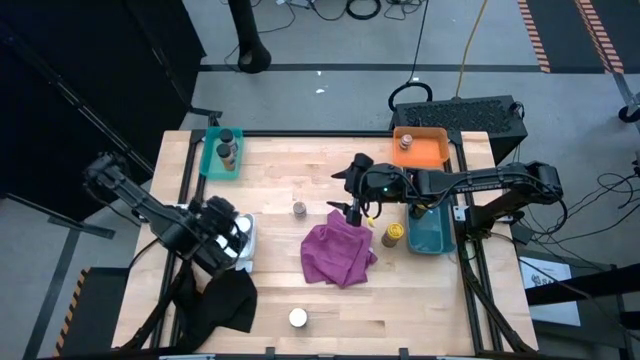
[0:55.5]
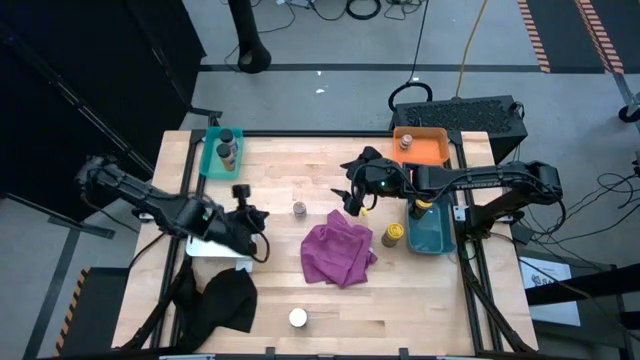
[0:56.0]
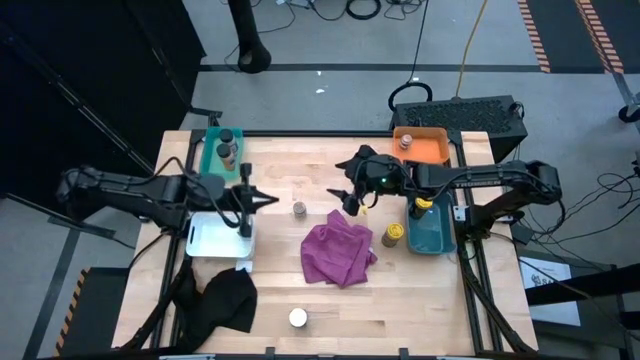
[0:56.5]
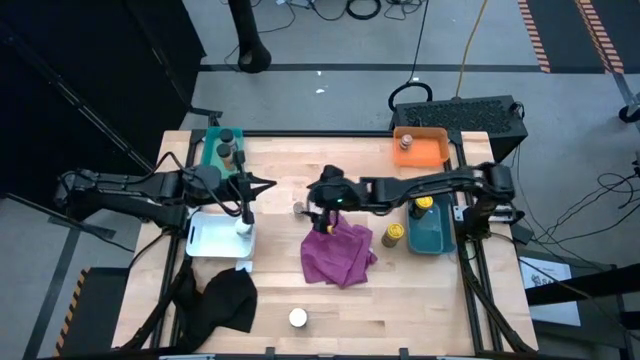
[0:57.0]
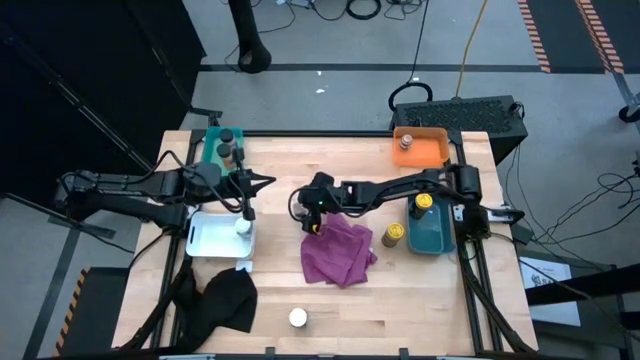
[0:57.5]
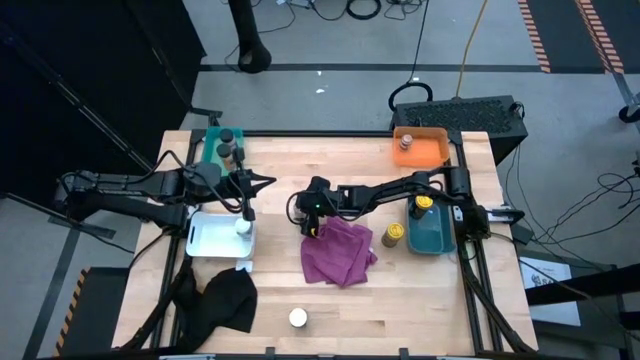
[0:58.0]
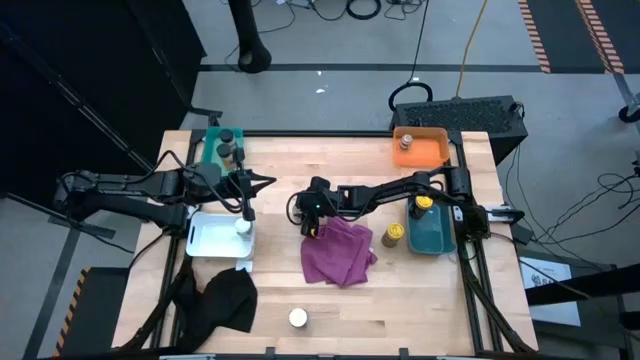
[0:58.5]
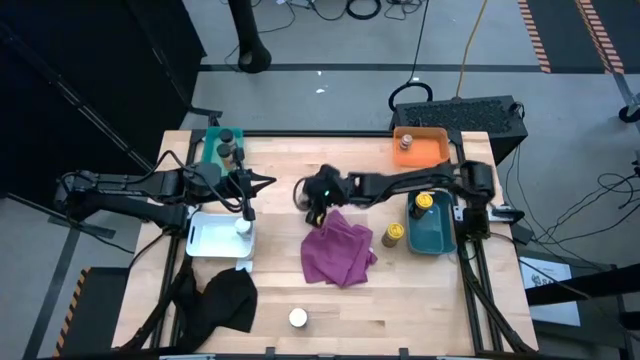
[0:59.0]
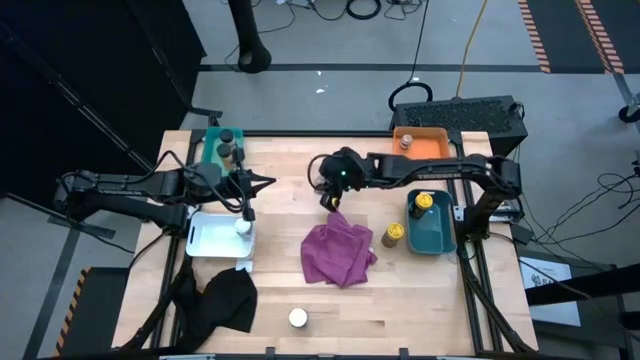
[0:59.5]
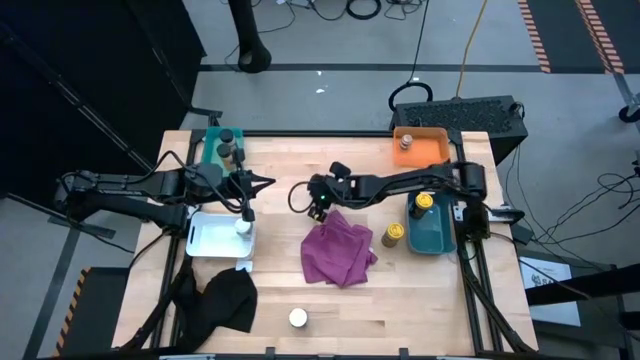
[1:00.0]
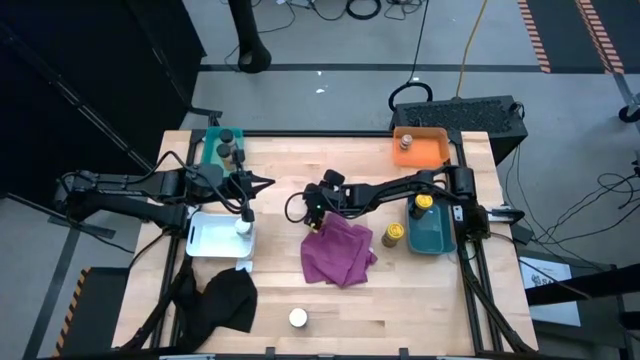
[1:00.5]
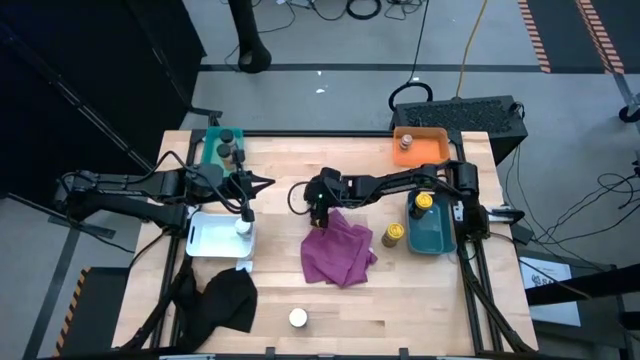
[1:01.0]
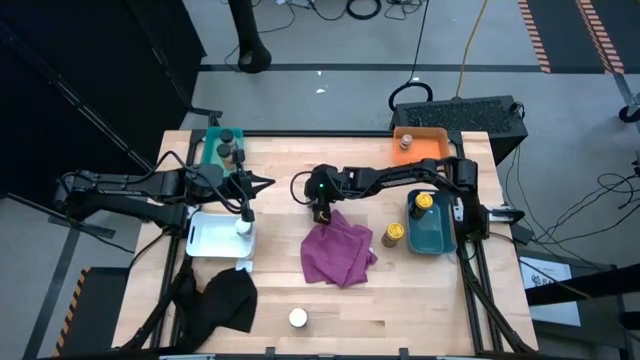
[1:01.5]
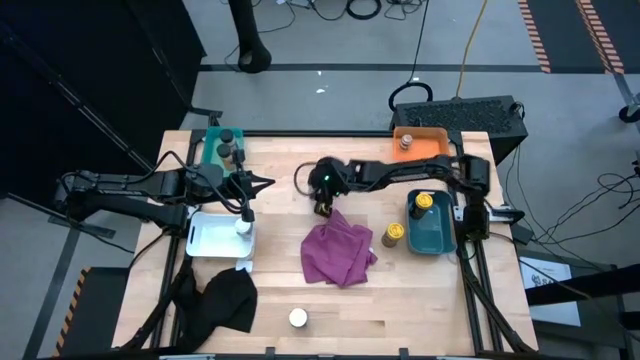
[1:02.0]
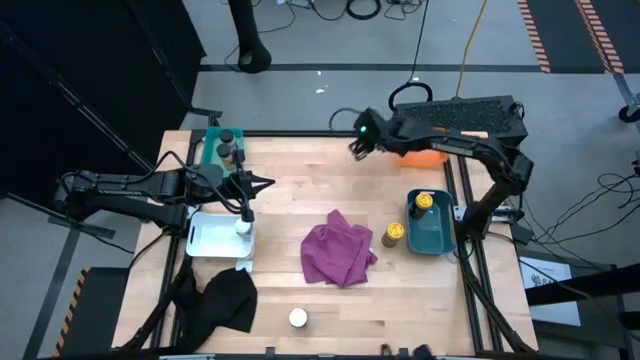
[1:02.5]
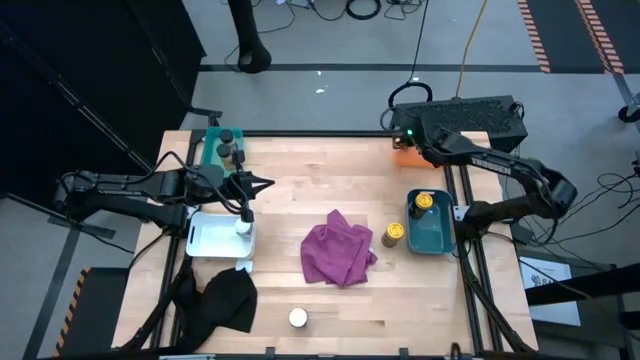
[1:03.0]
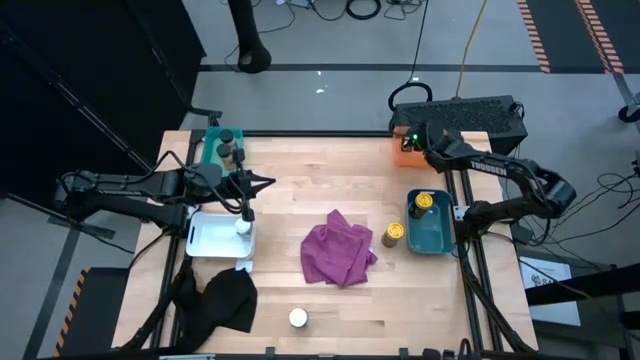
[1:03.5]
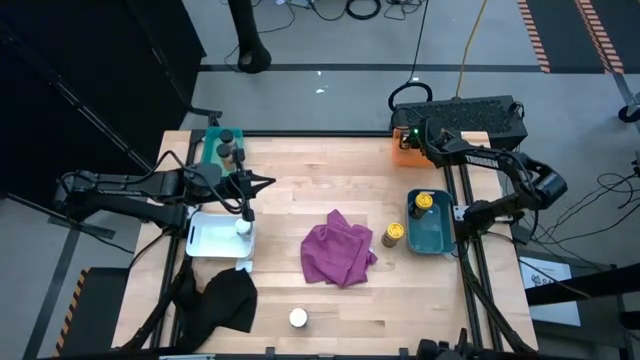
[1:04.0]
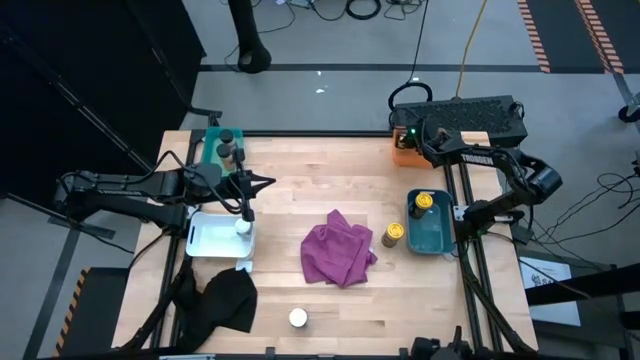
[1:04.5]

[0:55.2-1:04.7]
Task: Sort spices by type
Put the brown seasoning bottle into the orange bin

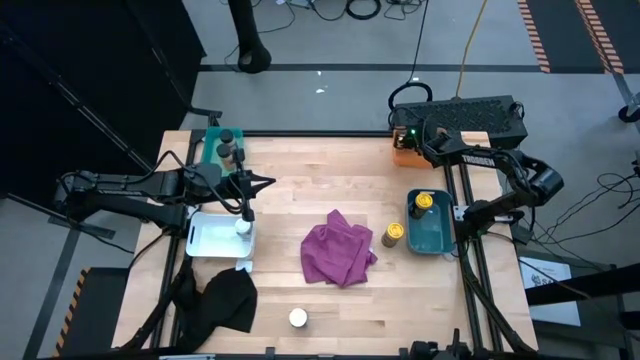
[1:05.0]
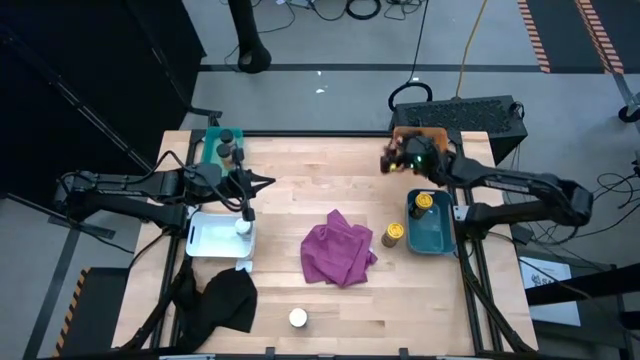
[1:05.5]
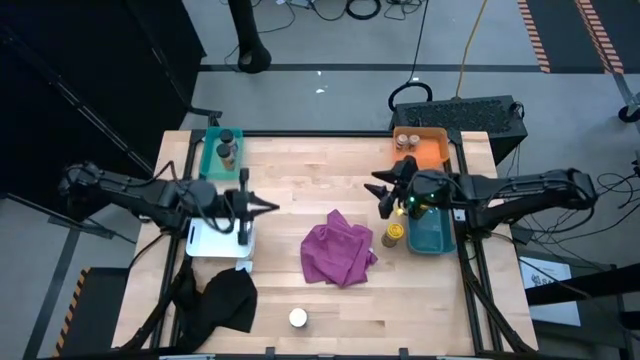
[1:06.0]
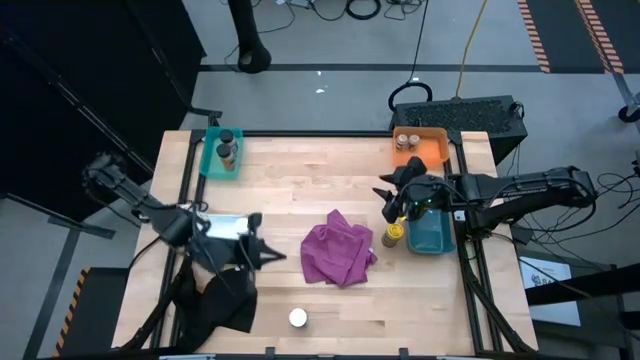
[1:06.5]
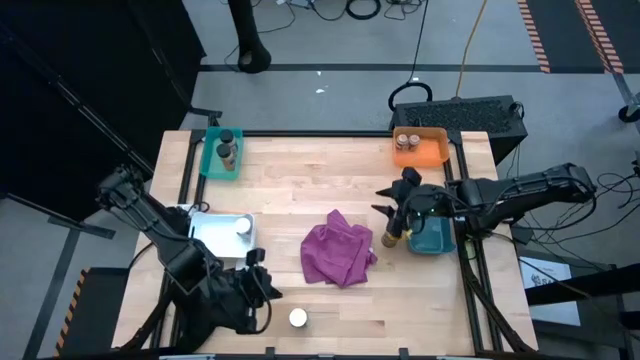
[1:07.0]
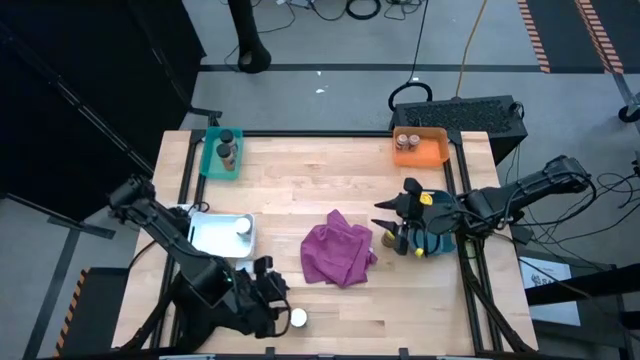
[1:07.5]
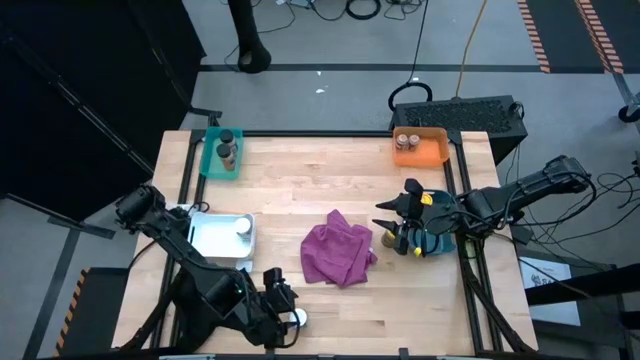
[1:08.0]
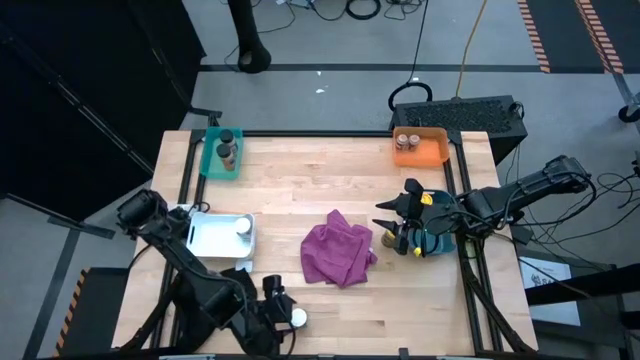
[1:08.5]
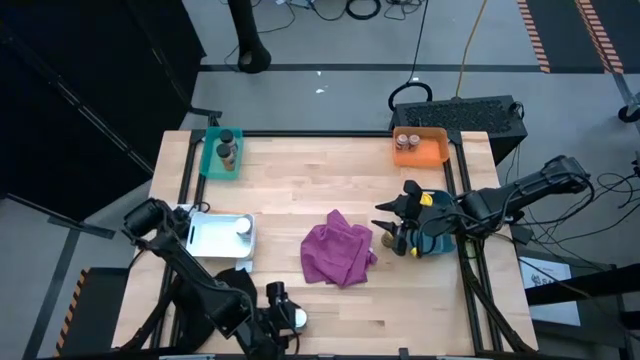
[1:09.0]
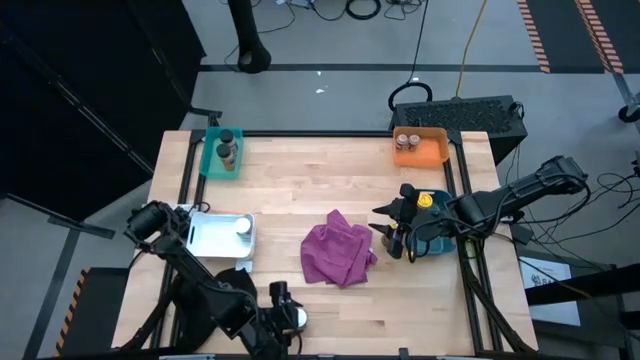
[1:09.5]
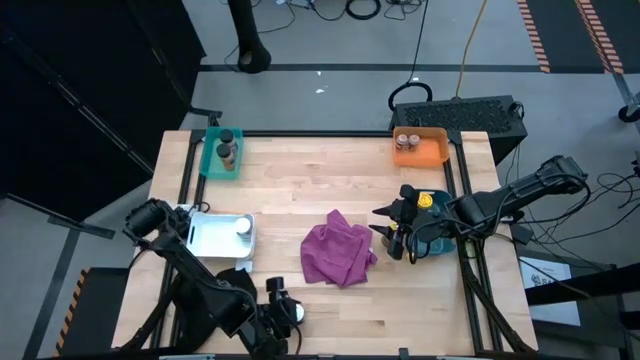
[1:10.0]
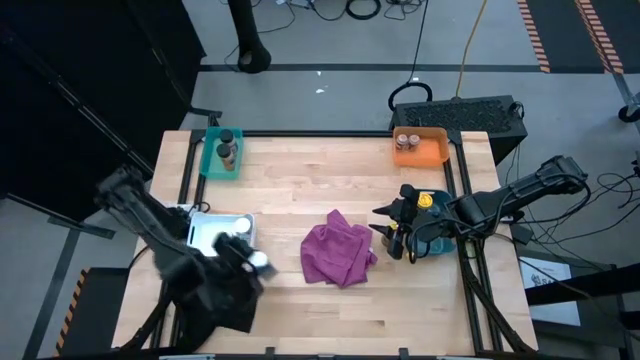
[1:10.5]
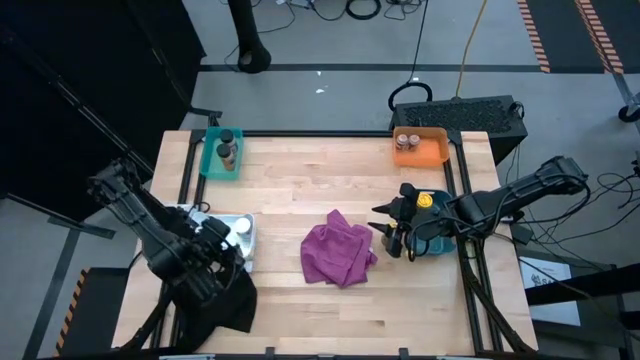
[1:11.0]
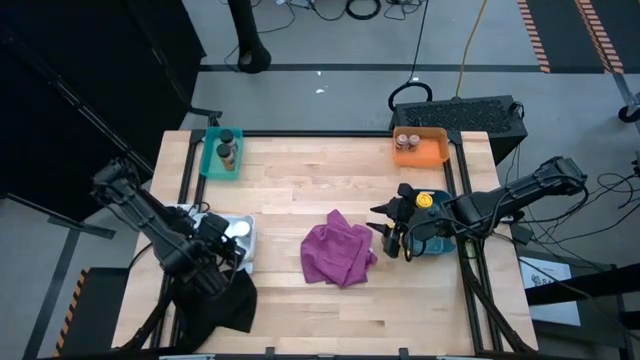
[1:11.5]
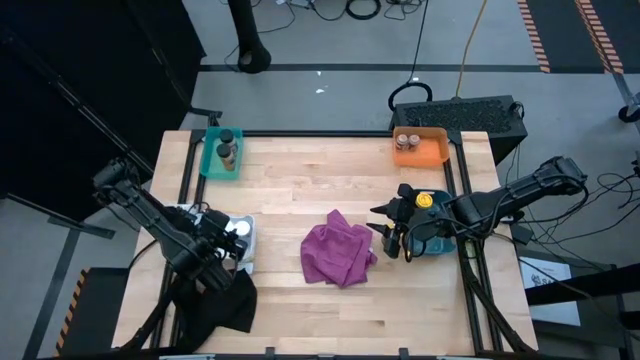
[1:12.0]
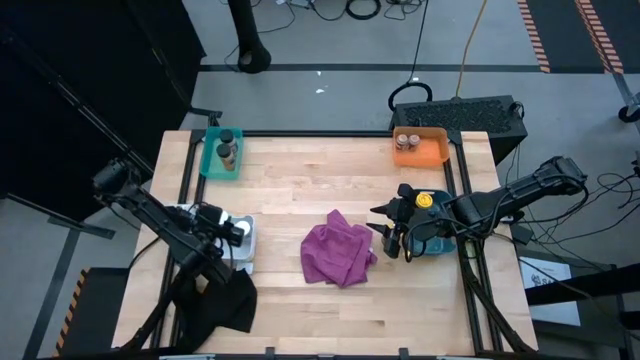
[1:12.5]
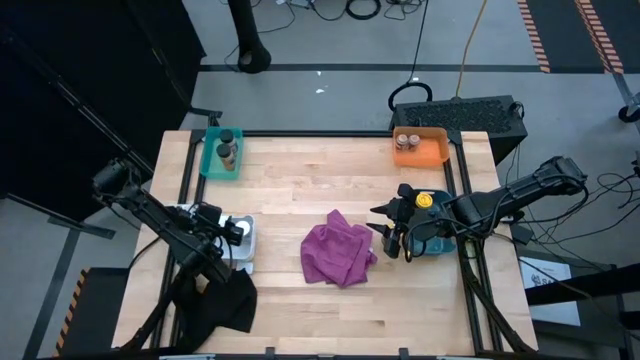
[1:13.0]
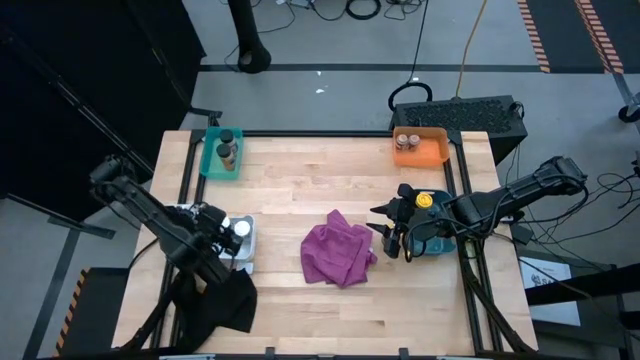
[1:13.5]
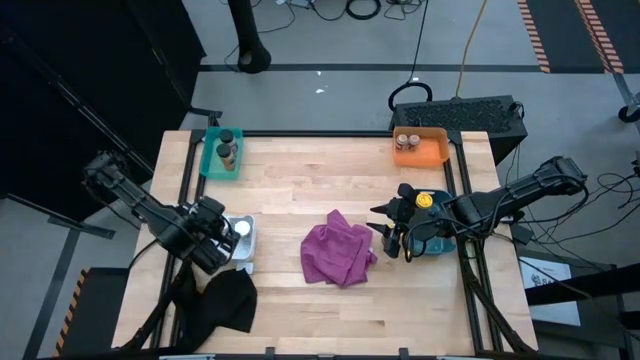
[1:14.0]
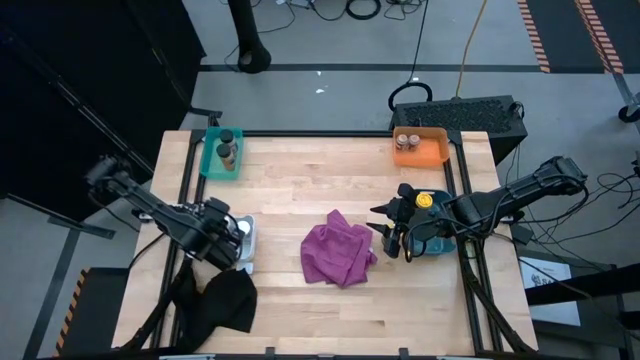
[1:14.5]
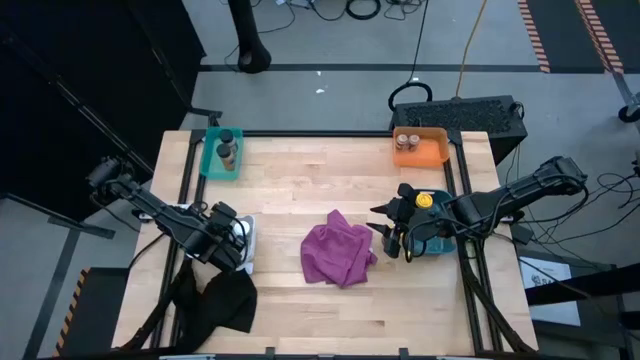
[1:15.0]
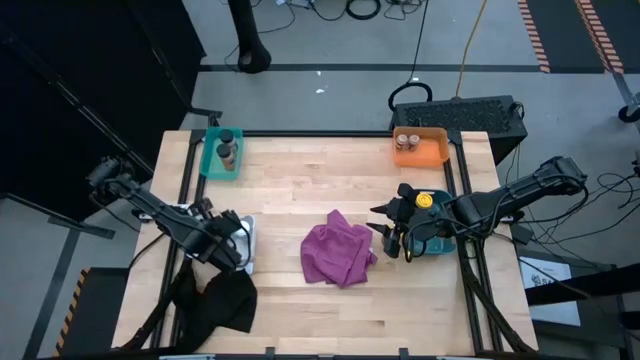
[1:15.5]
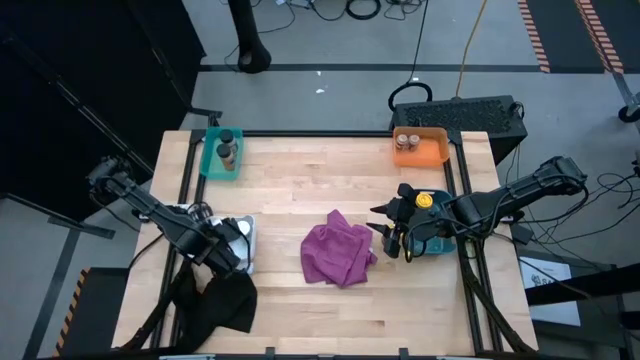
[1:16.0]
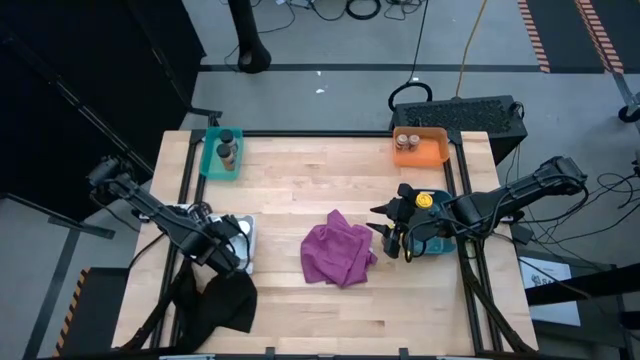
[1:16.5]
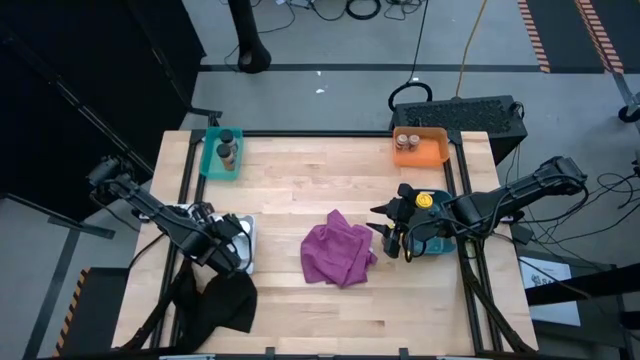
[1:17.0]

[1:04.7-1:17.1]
Put the white seasoning bottle into the white bin

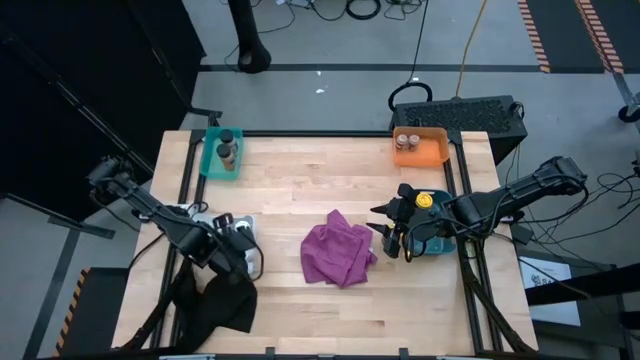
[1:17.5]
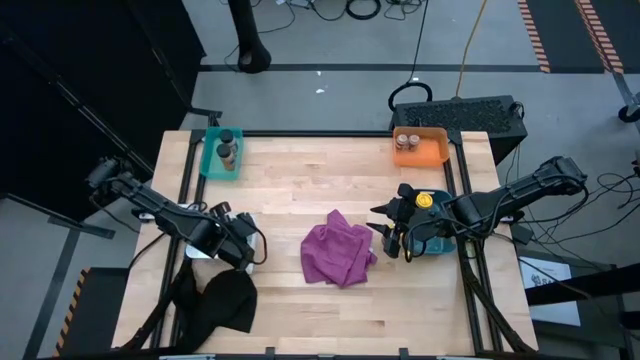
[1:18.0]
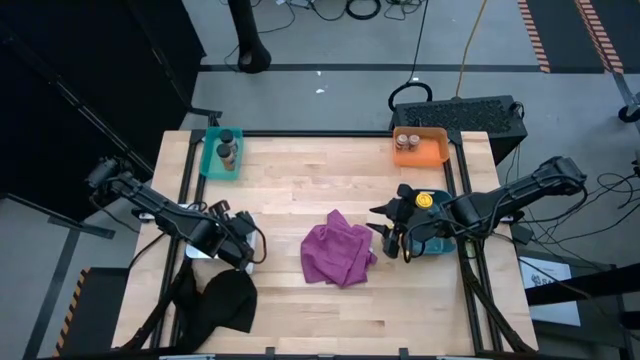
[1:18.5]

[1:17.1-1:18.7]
Adjust the white seasoning bottles
